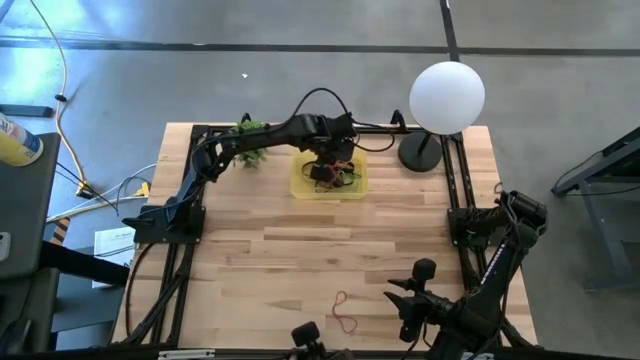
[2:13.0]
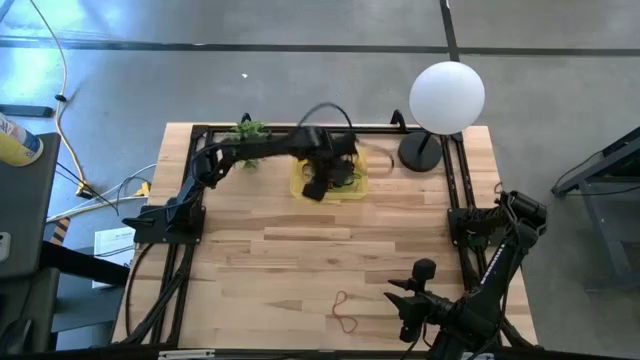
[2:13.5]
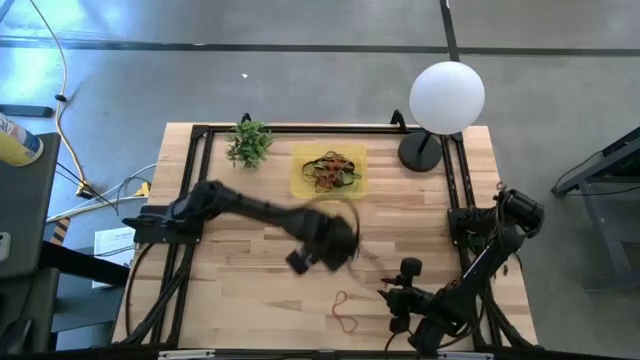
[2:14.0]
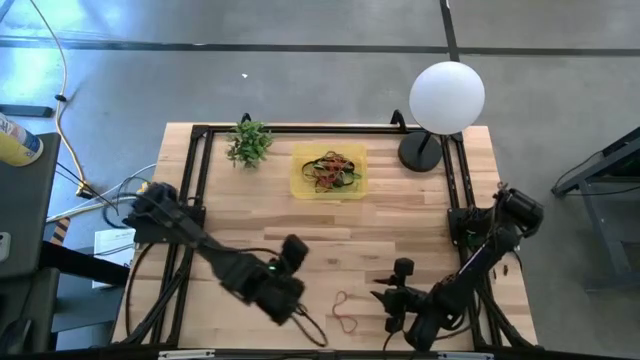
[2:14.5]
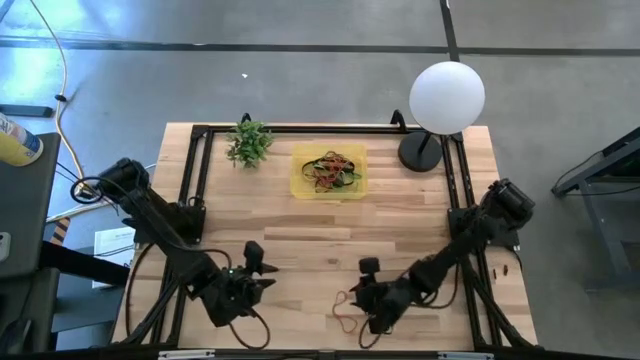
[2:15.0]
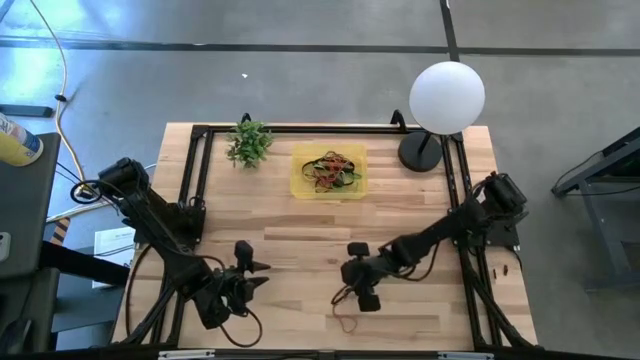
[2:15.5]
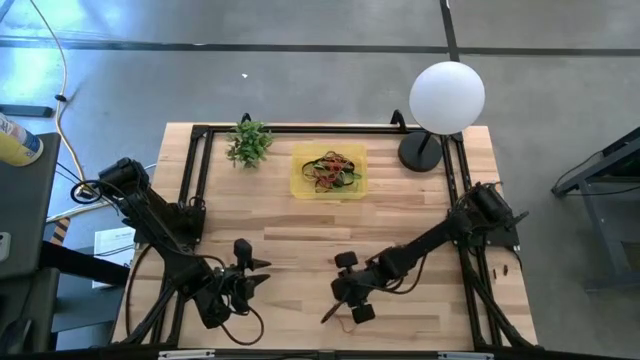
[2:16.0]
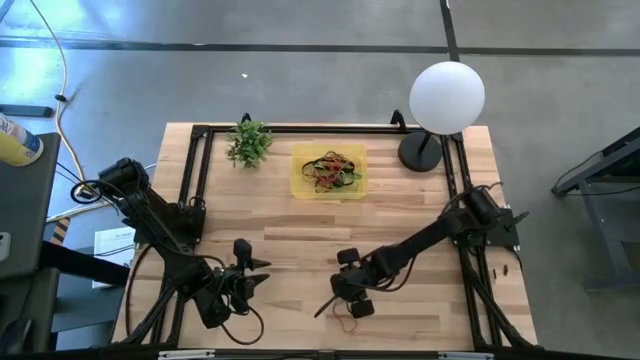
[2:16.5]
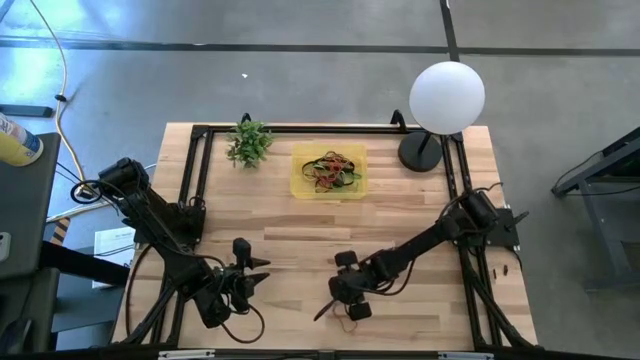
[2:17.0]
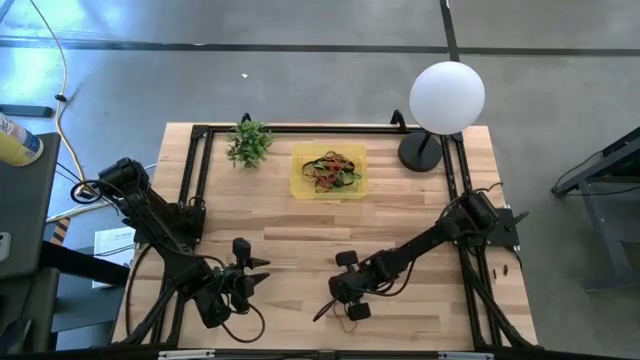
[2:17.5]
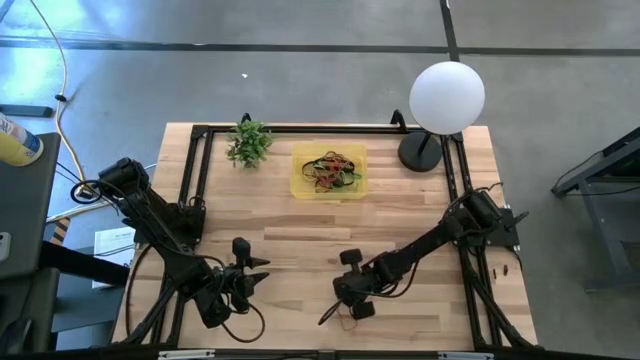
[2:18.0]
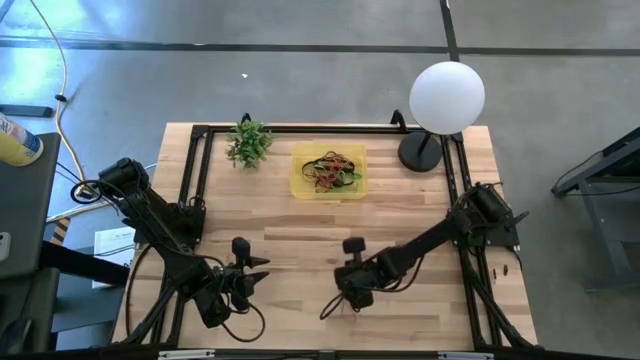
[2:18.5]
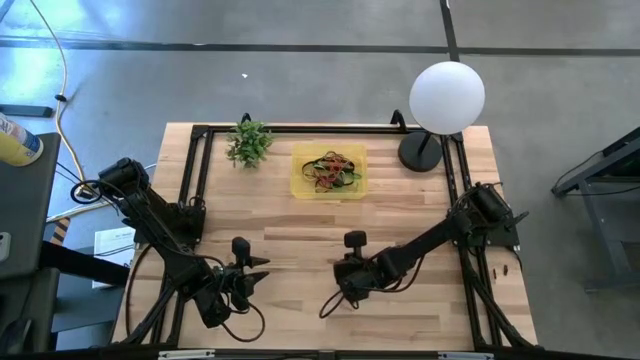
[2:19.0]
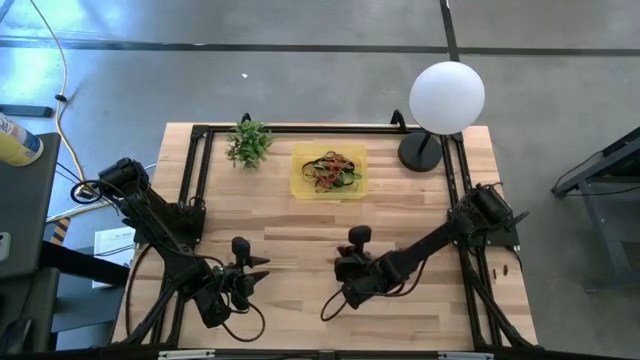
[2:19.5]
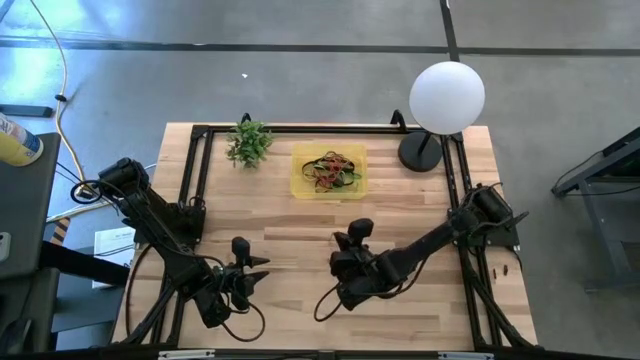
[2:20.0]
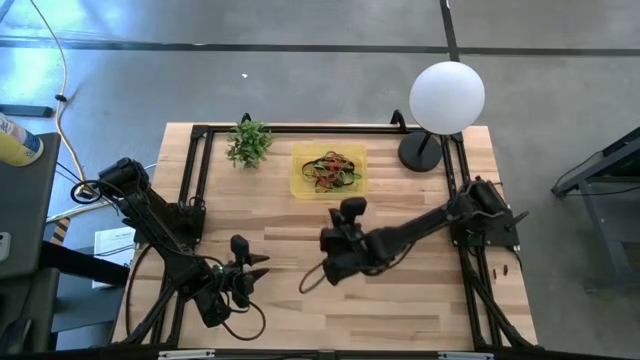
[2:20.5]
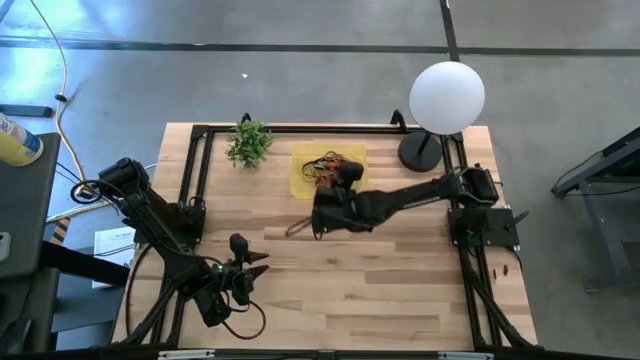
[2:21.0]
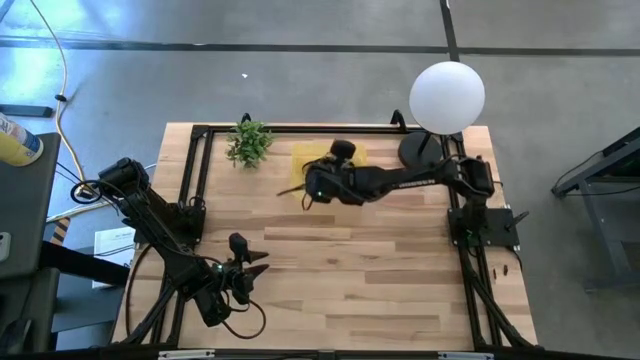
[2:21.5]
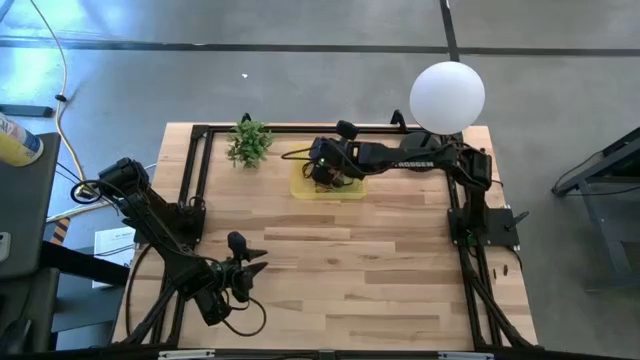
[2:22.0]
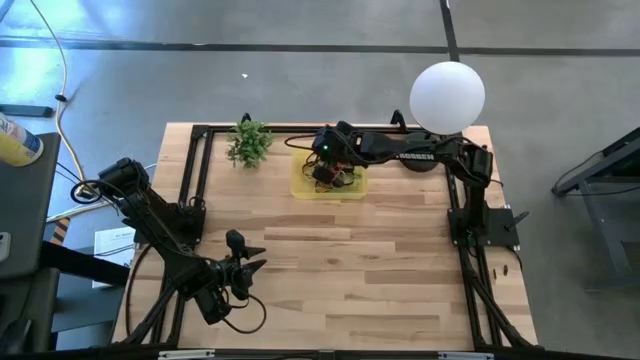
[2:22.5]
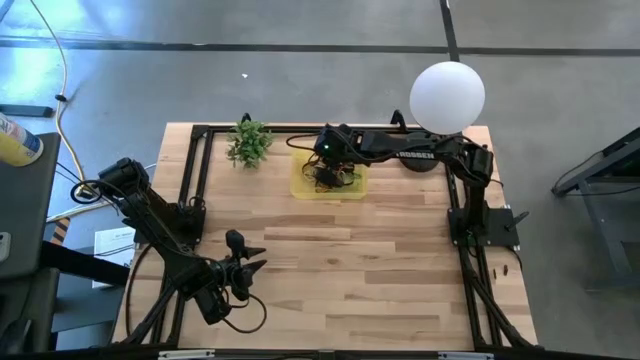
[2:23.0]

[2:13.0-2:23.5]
Task: Pick and place rubber bands into bin
Put the red rubber band into the yellow bin

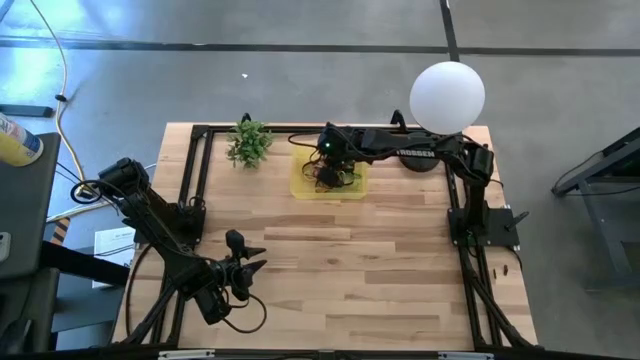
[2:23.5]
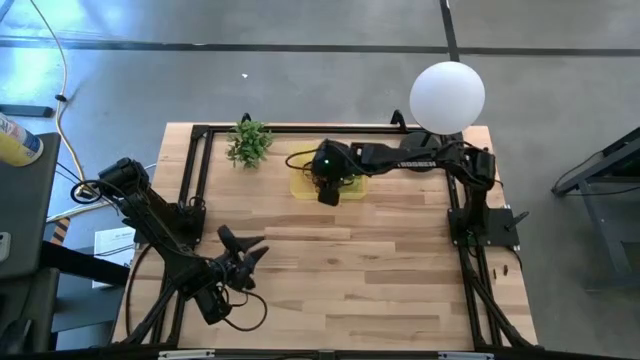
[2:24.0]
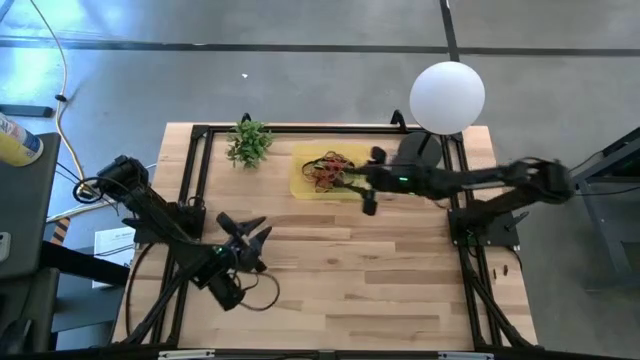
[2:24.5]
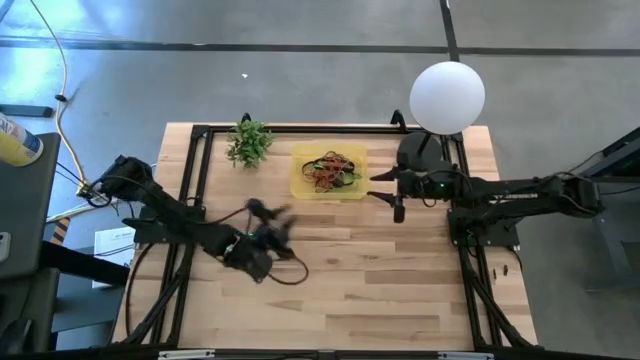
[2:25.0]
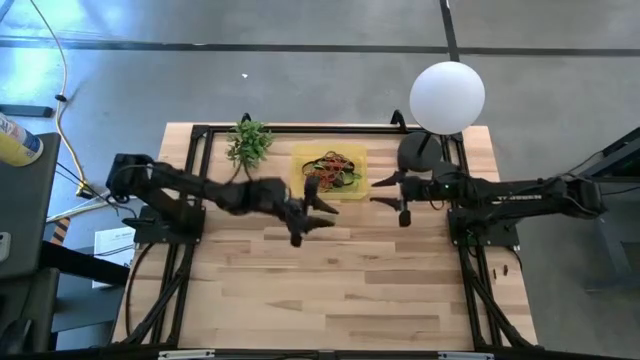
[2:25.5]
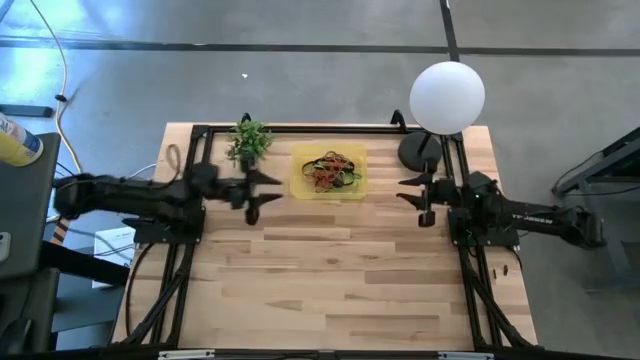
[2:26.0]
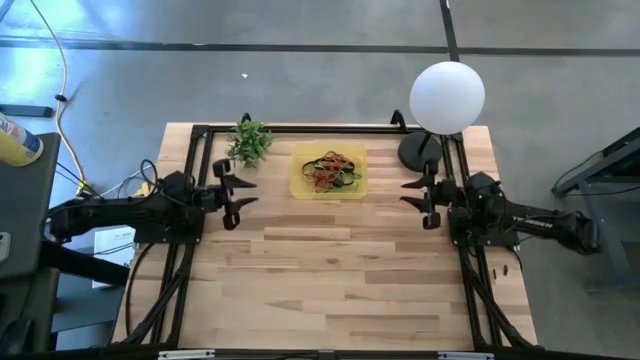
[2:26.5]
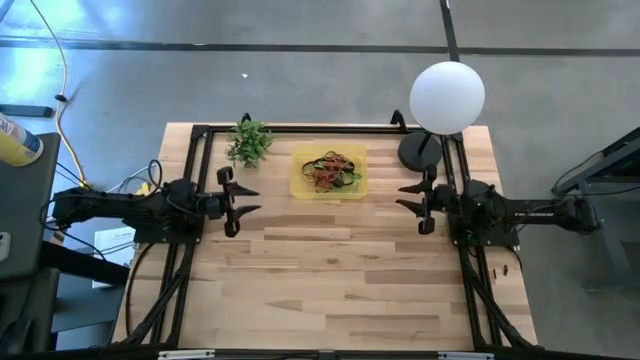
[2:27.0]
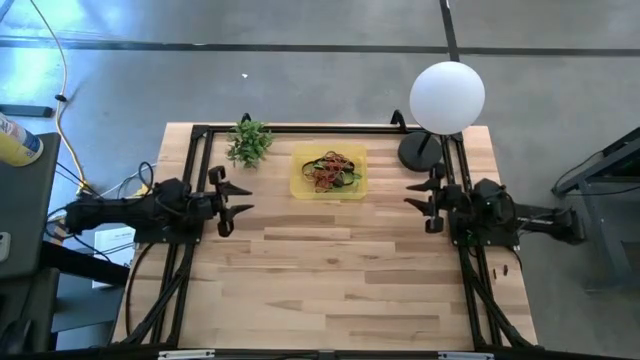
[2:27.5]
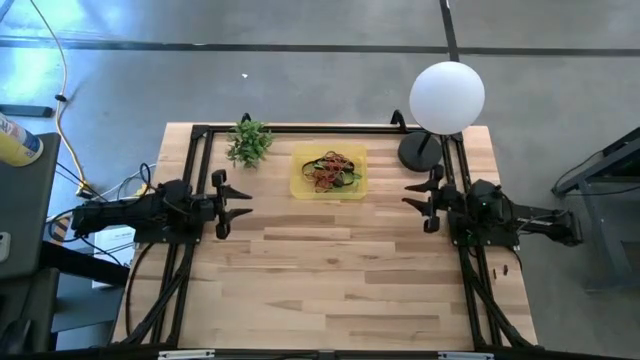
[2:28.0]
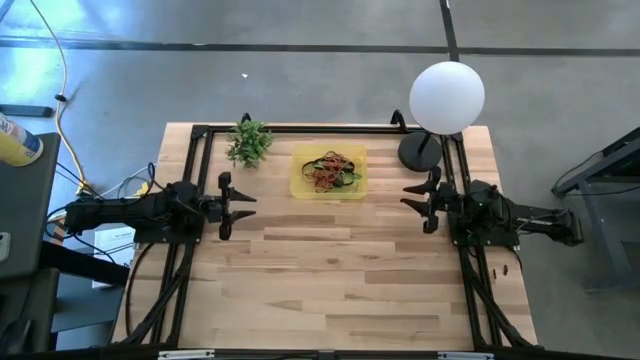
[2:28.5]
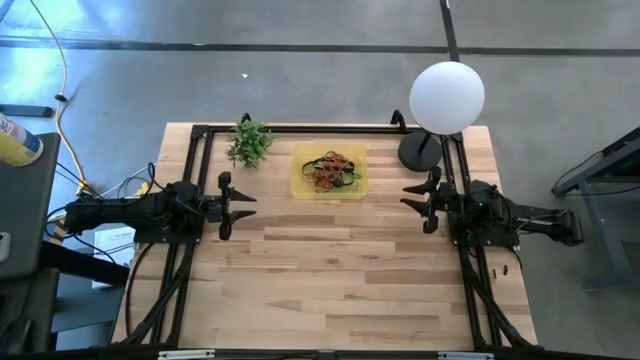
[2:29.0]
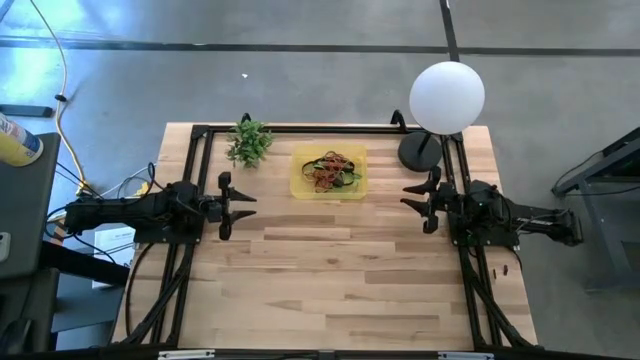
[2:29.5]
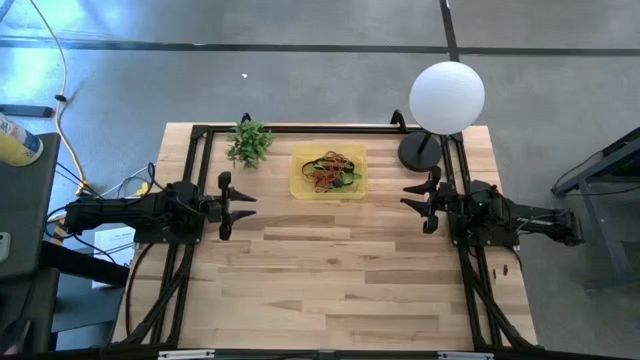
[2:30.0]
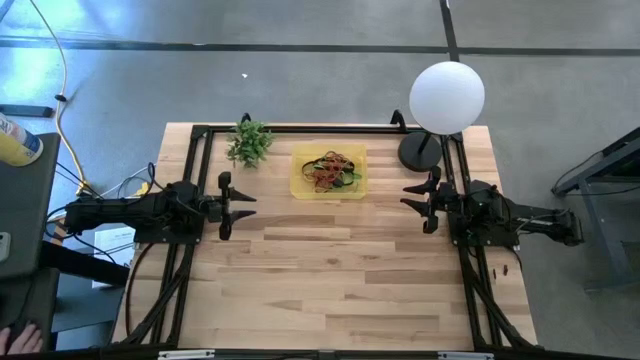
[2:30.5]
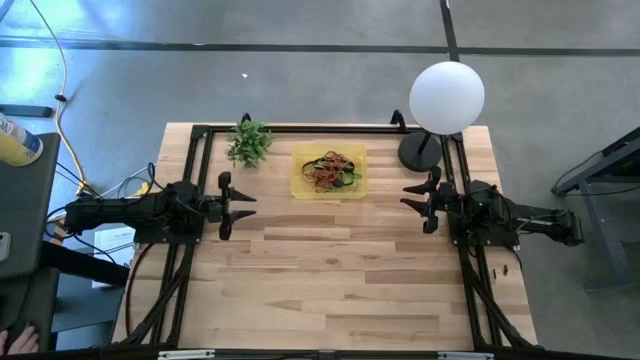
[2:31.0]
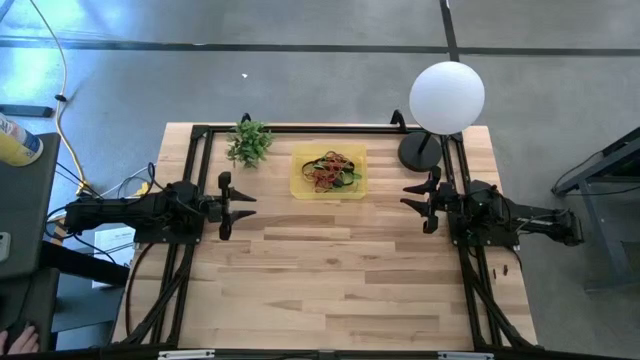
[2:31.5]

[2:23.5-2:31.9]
Return to Home Position
